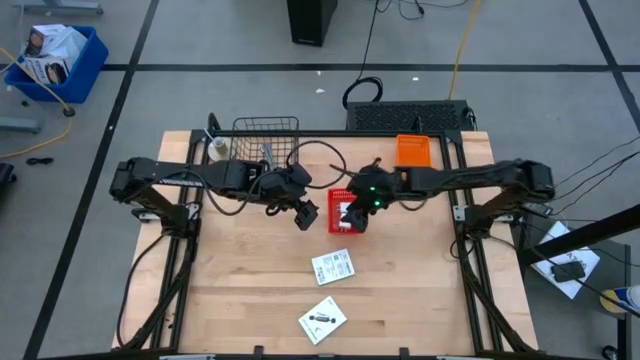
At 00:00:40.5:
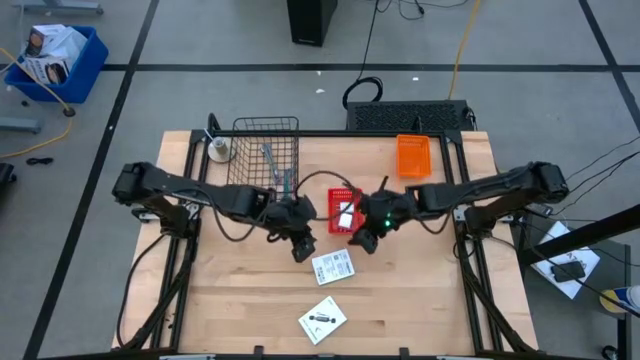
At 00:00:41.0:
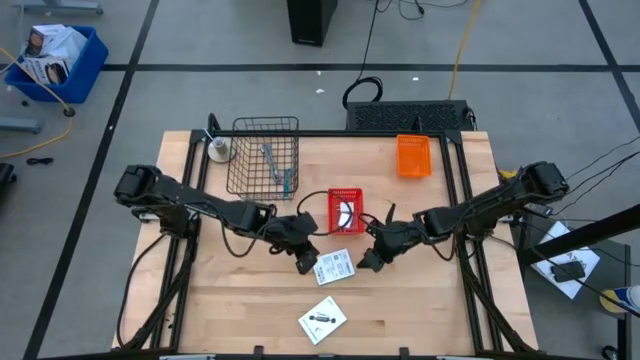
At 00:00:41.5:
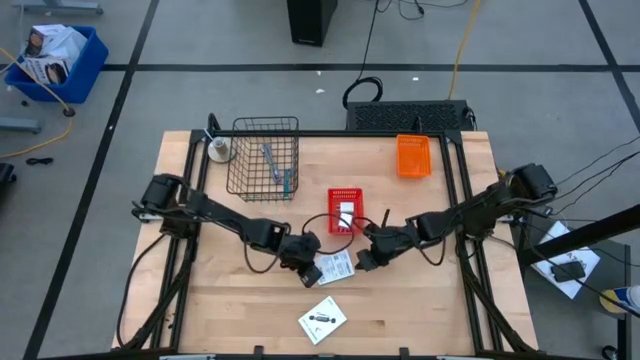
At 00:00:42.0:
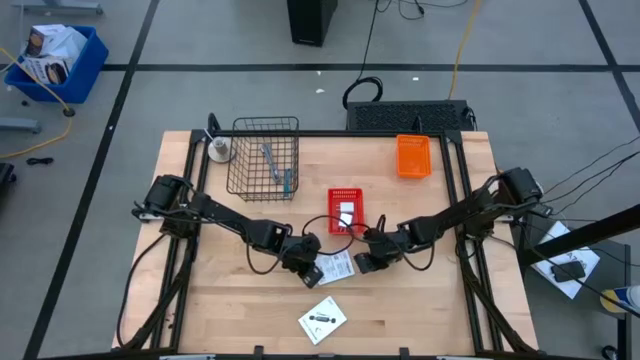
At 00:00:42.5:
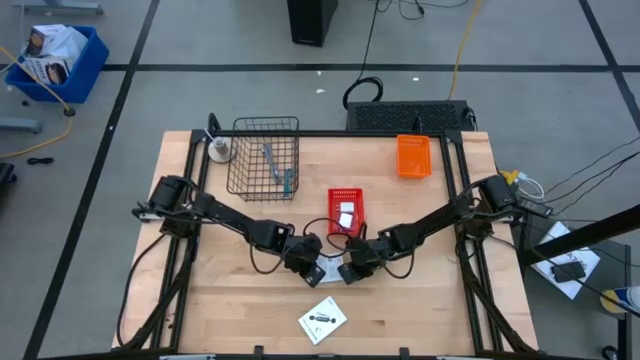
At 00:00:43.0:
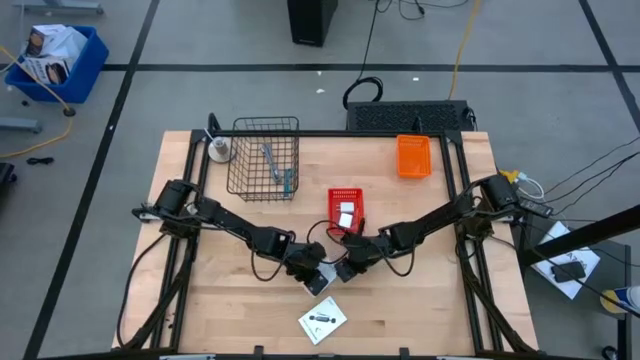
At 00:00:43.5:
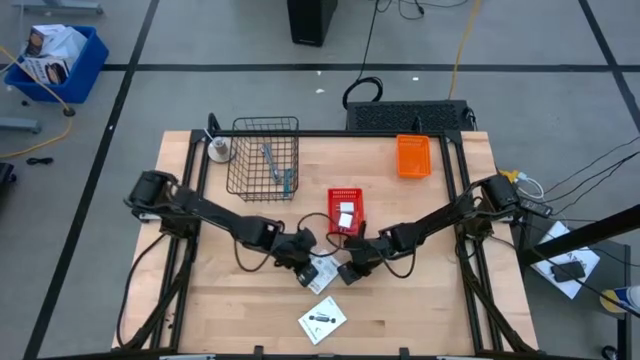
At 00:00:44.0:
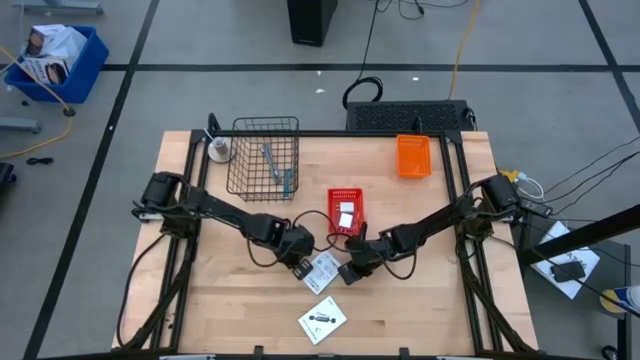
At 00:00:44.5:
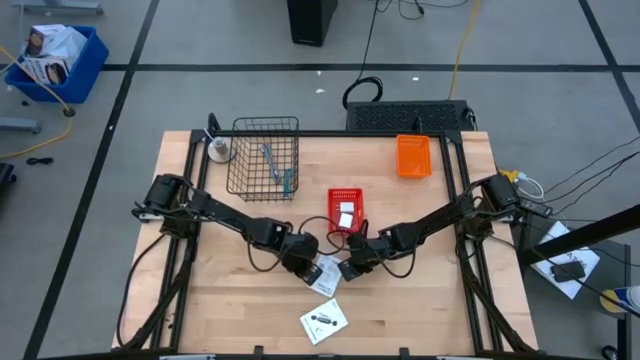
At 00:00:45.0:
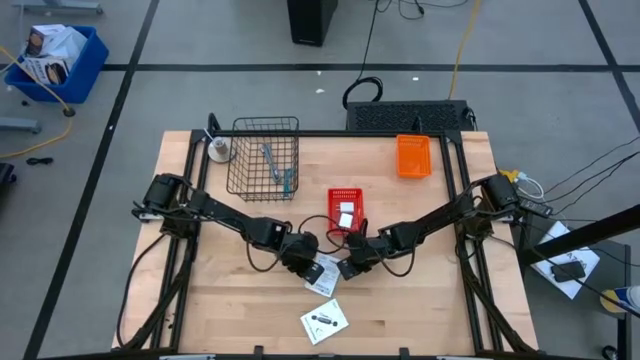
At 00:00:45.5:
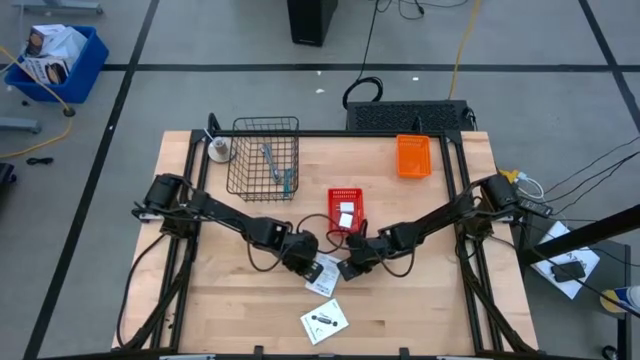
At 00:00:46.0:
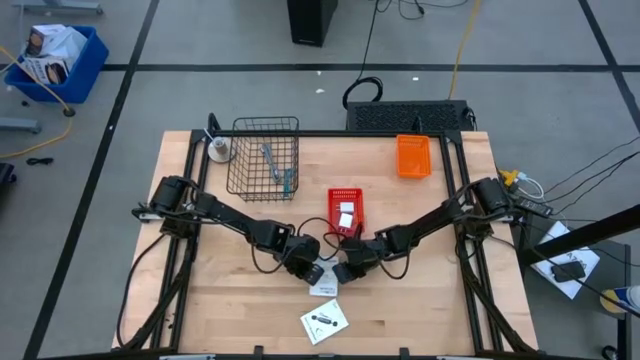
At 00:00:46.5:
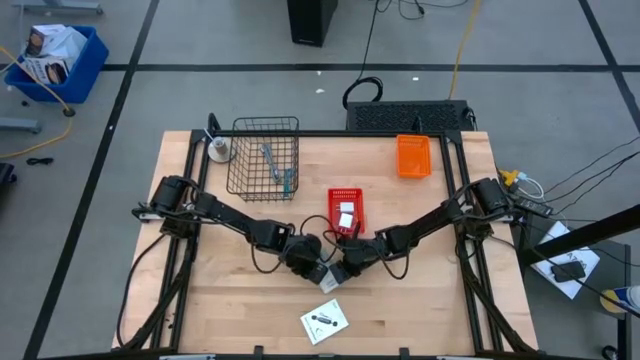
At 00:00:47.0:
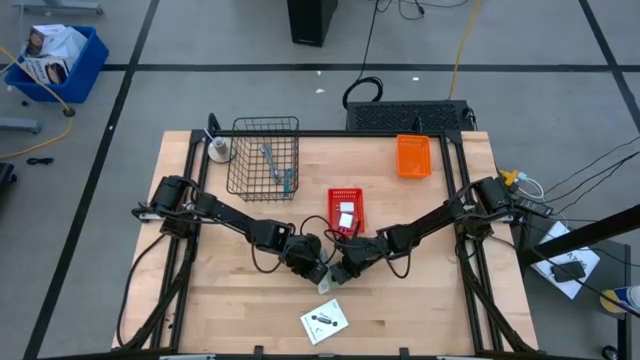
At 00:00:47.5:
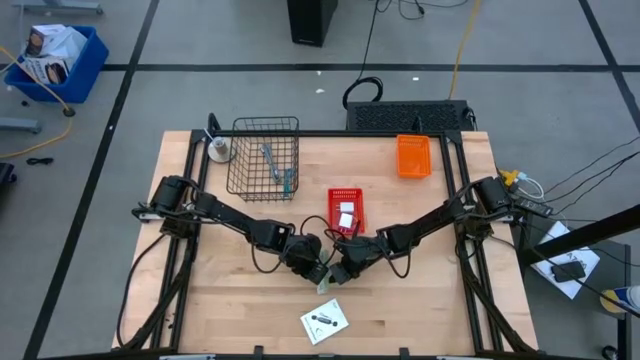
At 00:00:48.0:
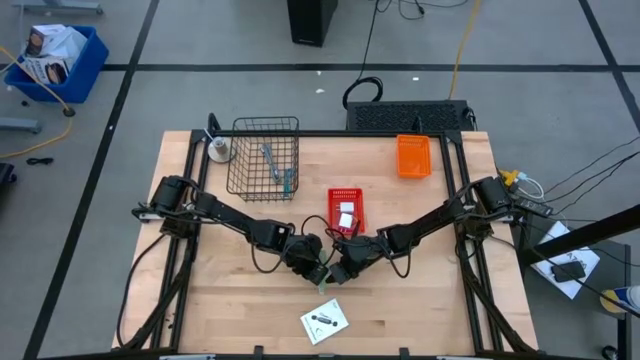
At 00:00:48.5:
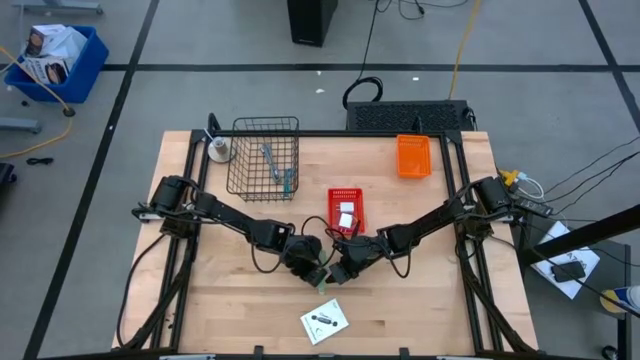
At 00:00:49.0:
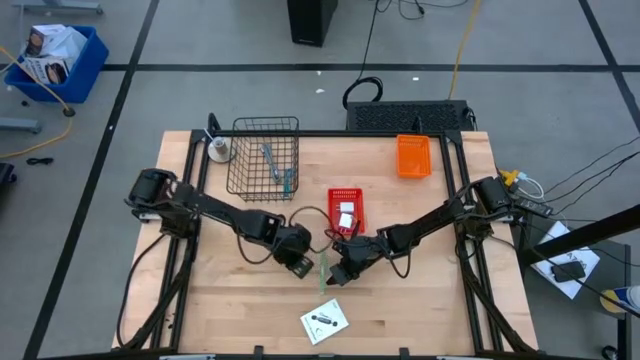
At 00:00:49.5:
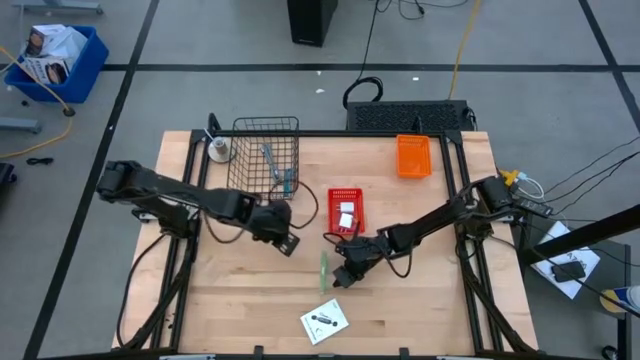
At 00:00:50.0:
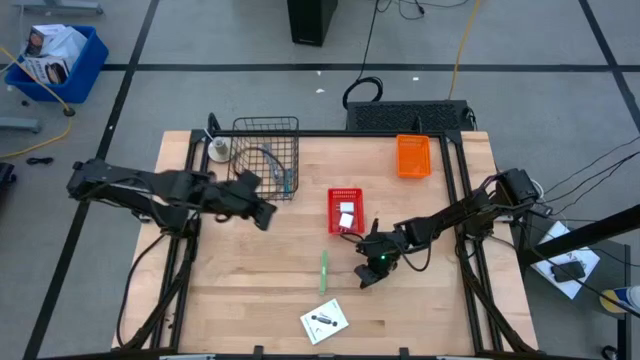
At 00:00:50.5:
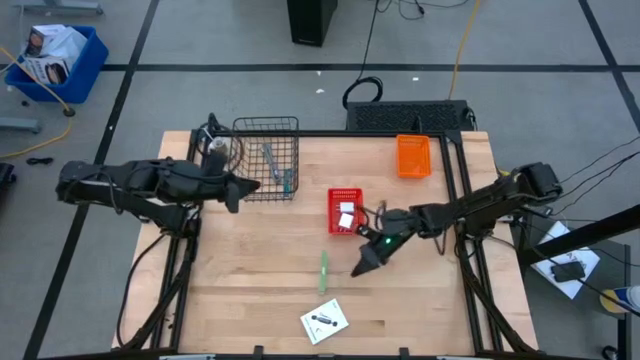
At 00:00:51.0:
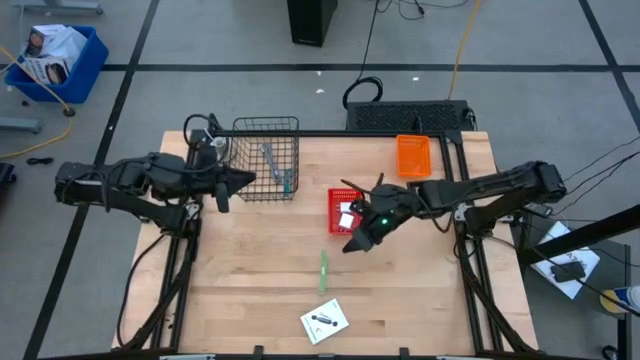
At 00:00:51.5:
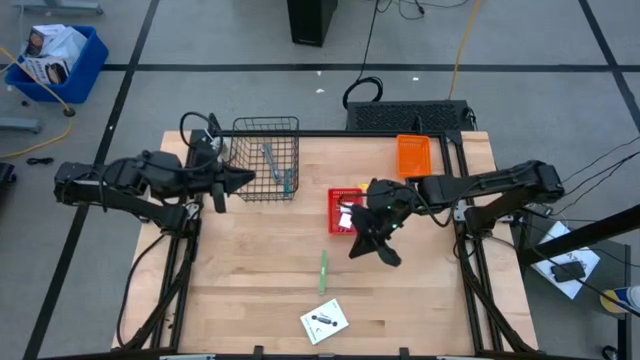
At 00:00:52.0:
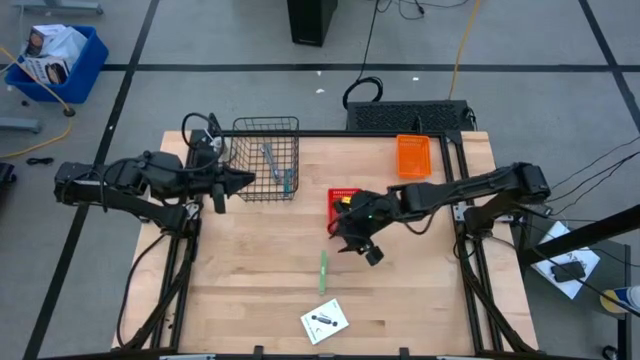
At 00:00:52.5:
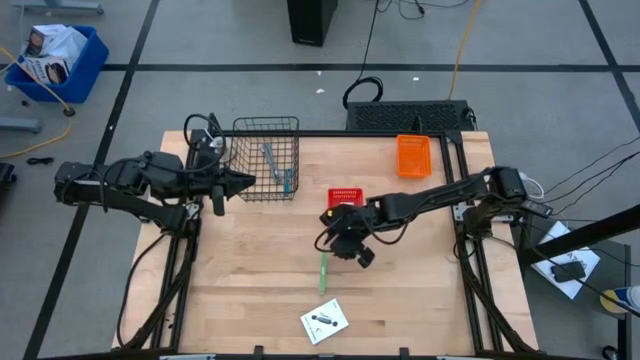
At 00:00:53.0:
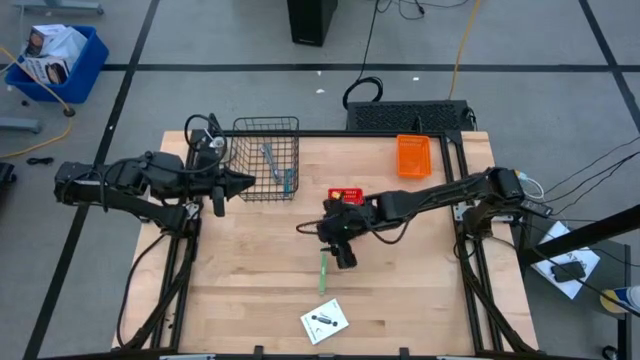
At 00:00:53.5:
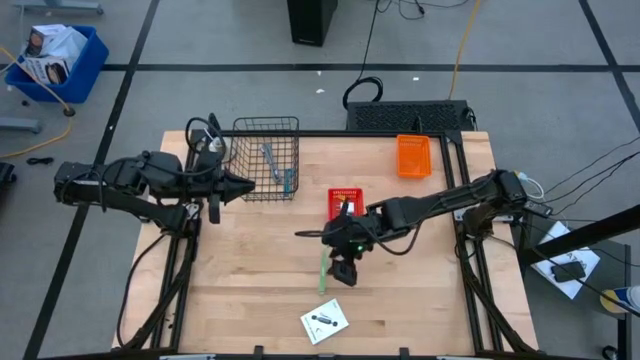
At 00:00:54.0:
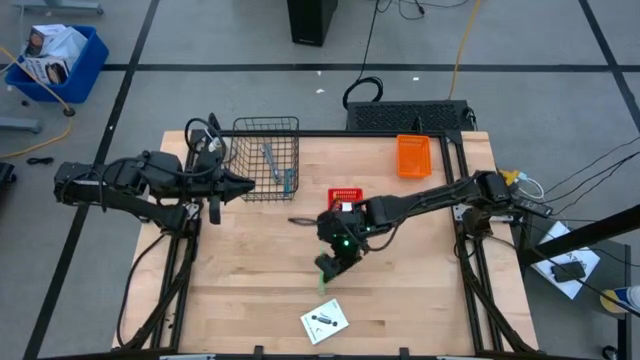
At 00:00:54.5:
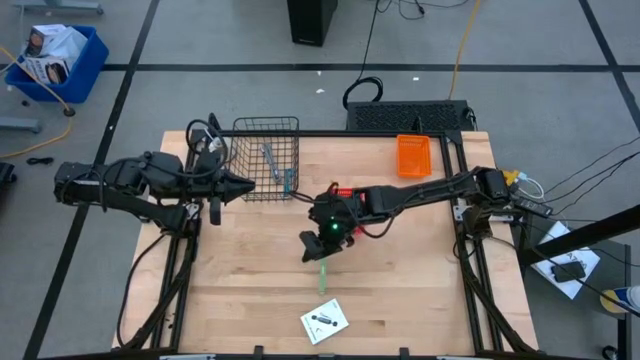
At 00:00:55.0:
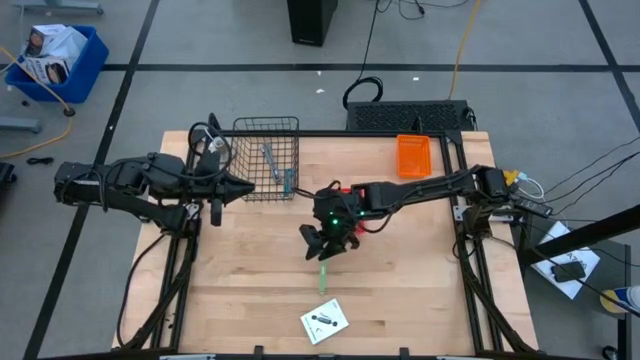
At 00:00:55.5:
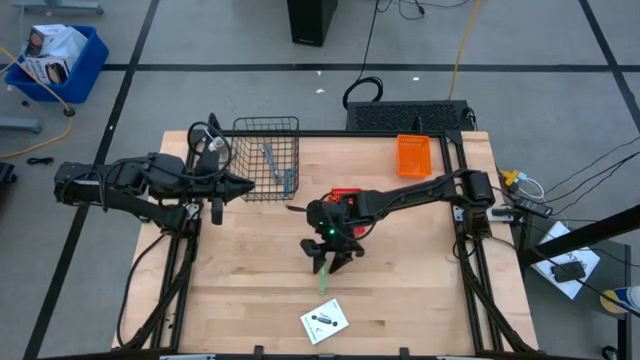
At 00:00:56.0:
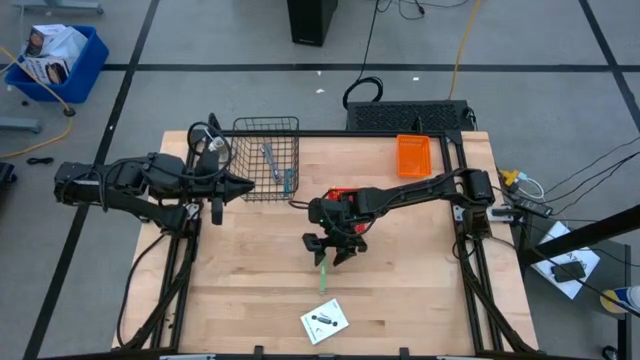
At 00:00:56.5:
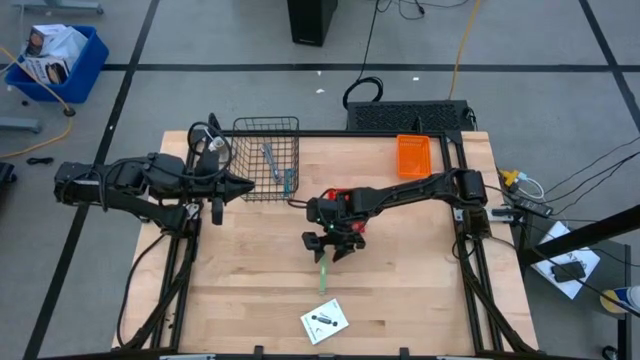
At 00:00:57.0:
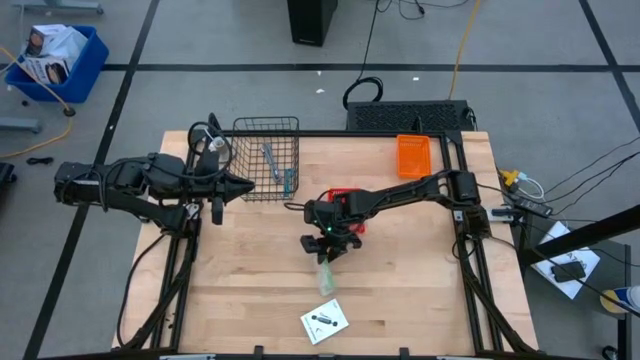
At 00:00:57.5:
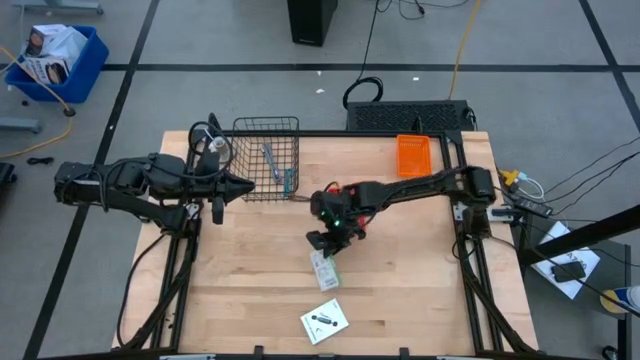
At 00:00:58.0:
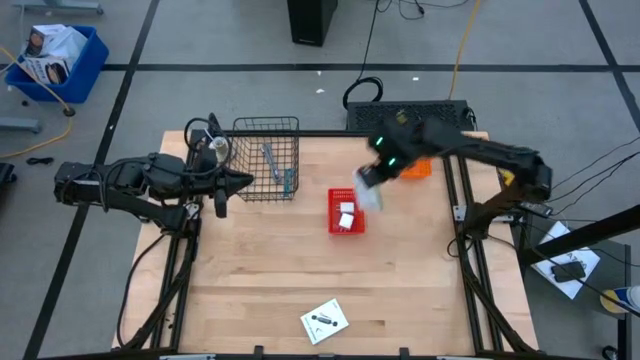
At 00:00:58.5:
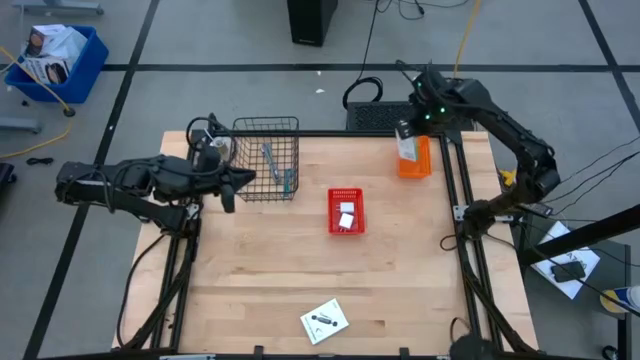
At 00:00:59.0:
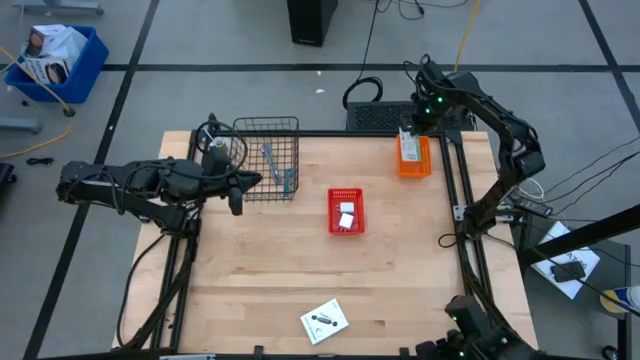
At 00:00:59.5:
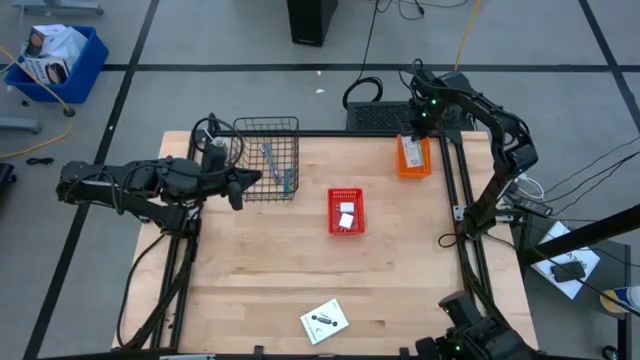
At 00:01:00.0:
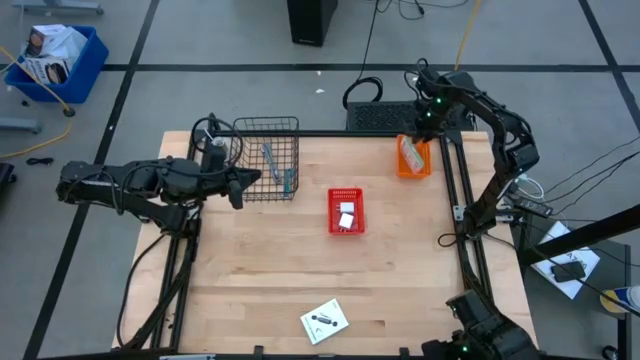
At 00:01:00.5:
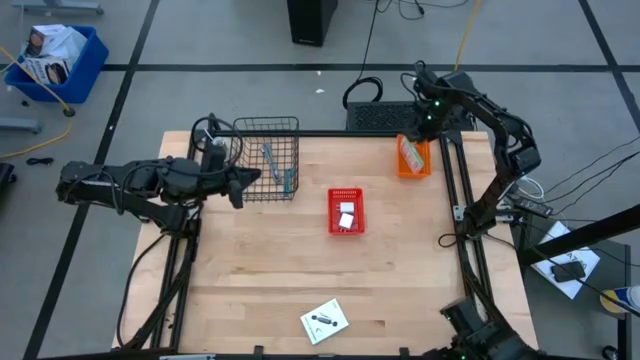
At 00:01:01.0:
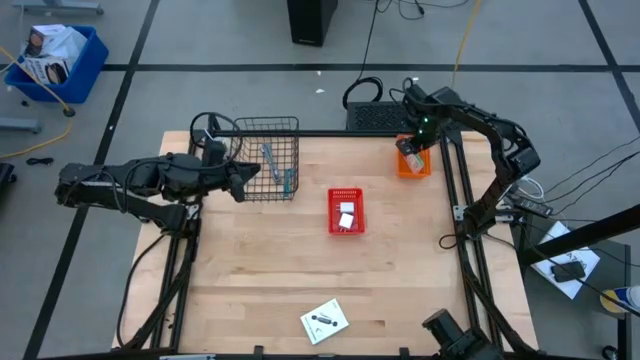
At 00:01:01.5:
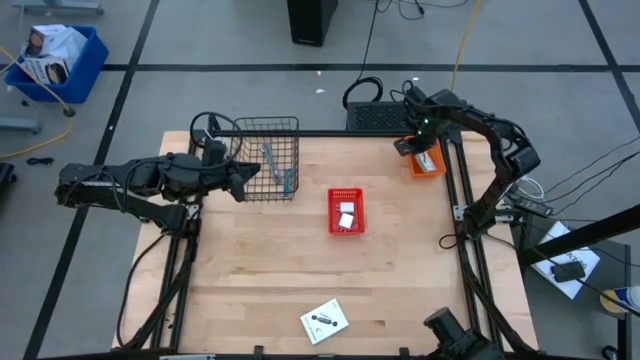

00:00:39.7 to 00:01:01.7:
Task: Pick and place items into bin
Put the top white card reader box into the orange bin
